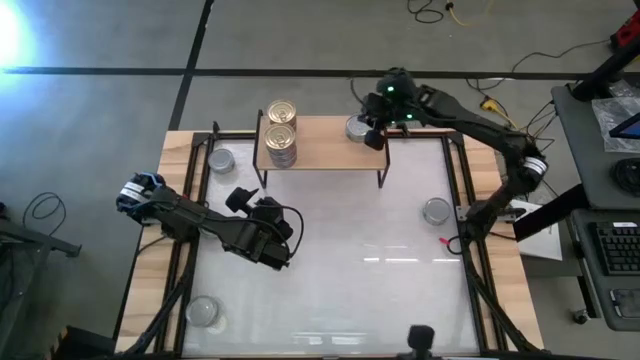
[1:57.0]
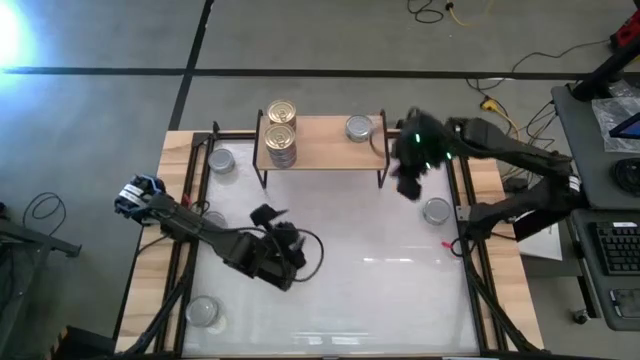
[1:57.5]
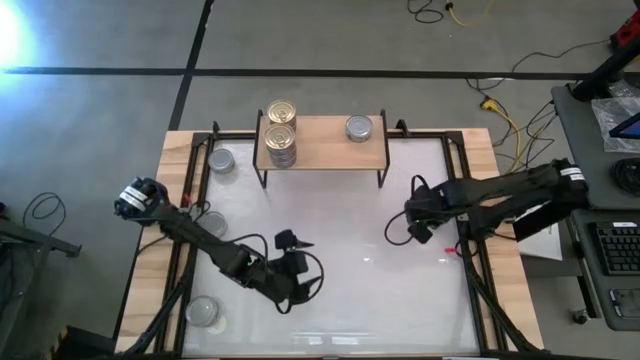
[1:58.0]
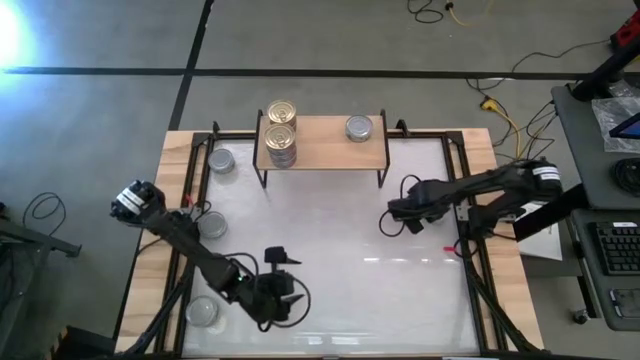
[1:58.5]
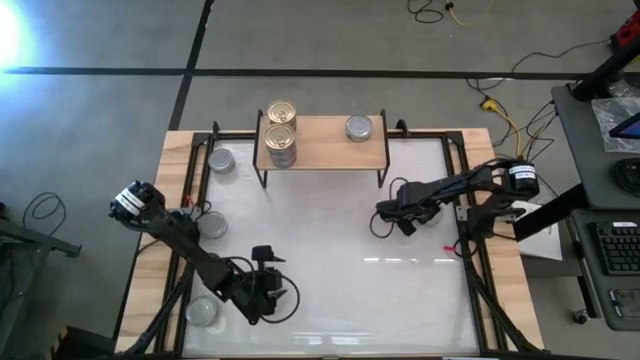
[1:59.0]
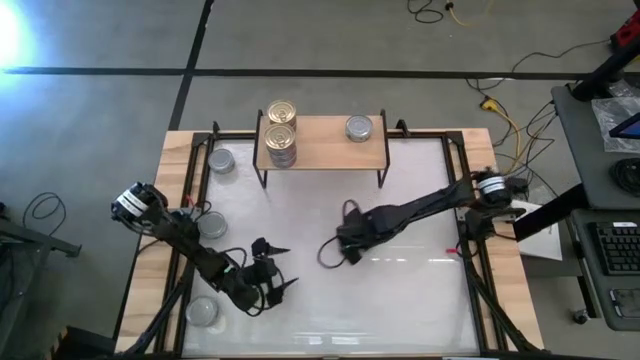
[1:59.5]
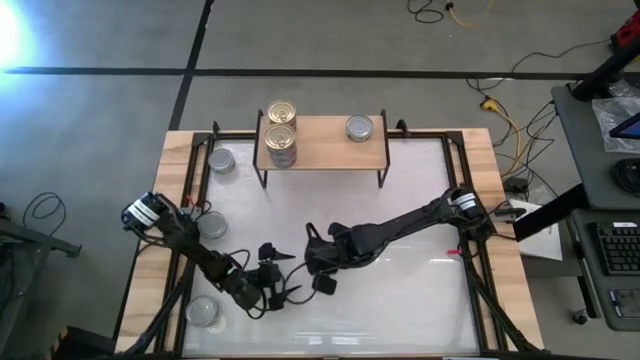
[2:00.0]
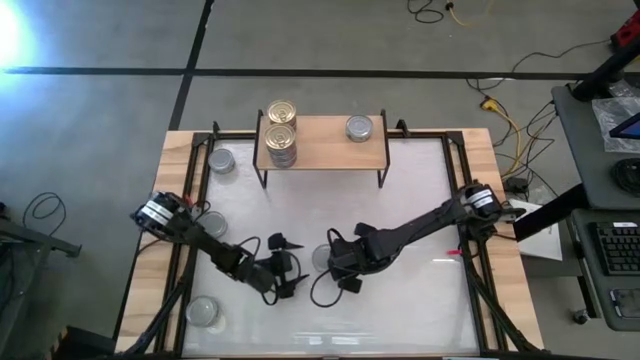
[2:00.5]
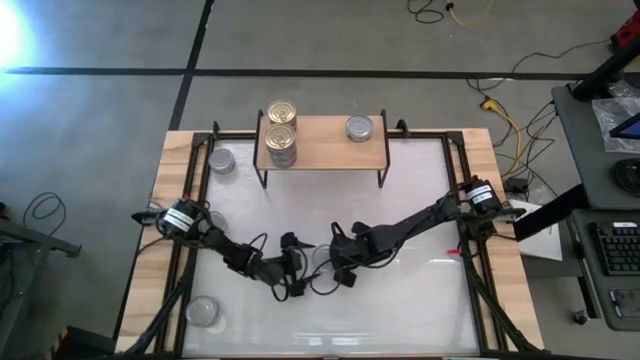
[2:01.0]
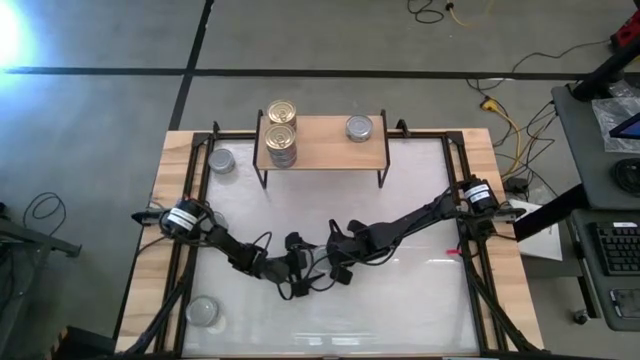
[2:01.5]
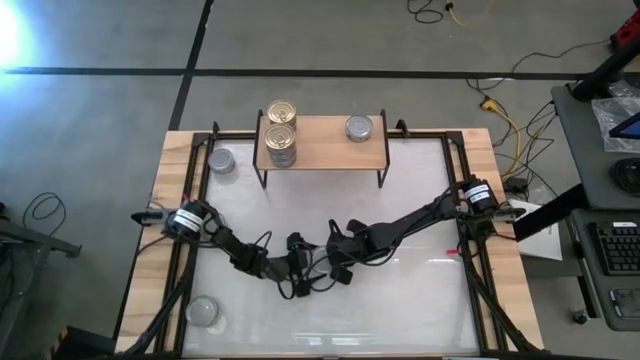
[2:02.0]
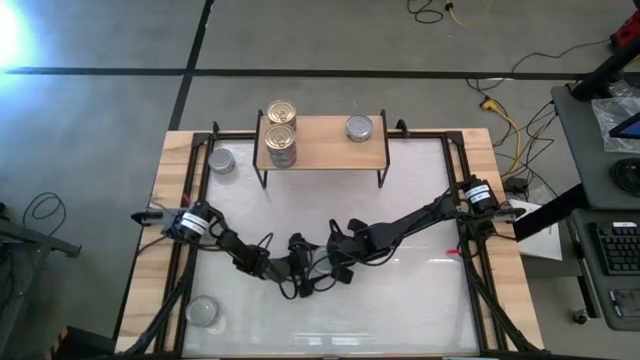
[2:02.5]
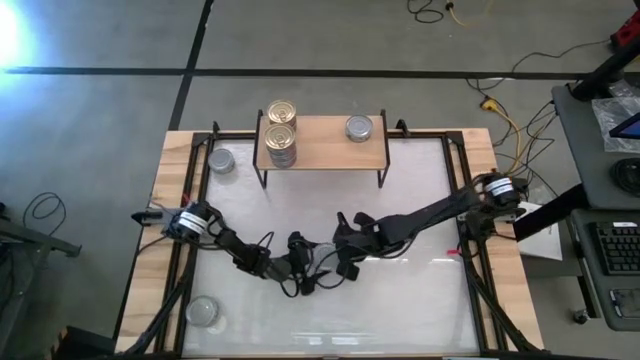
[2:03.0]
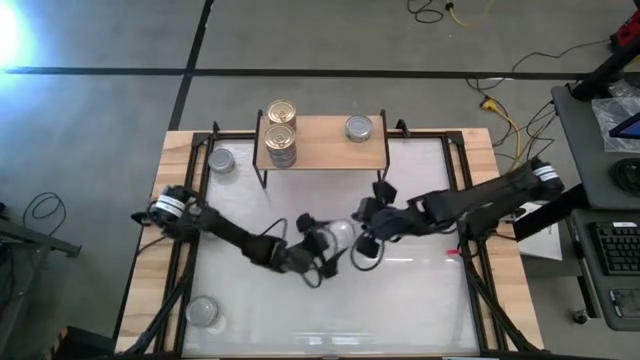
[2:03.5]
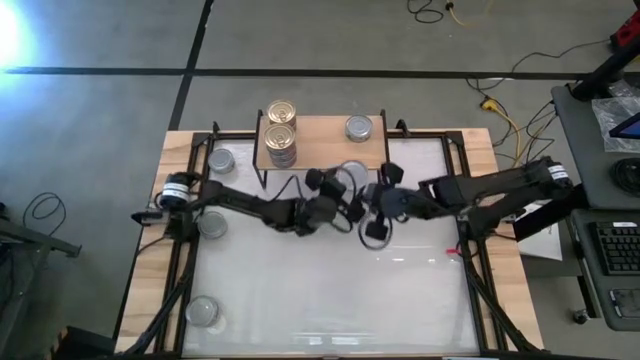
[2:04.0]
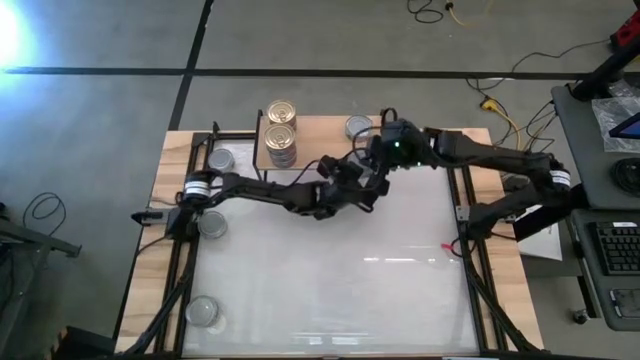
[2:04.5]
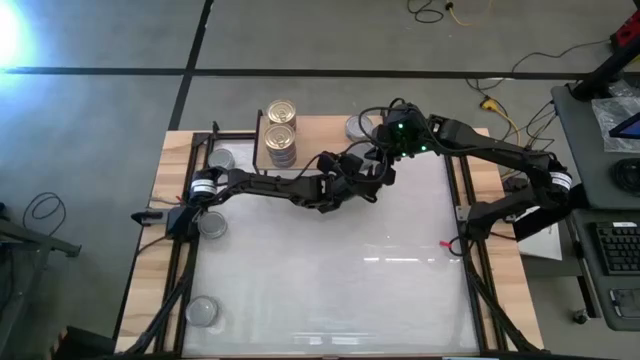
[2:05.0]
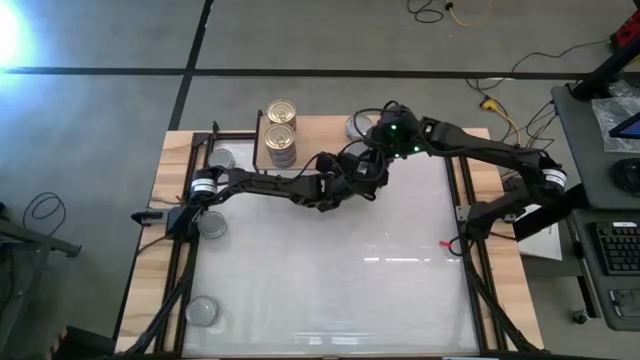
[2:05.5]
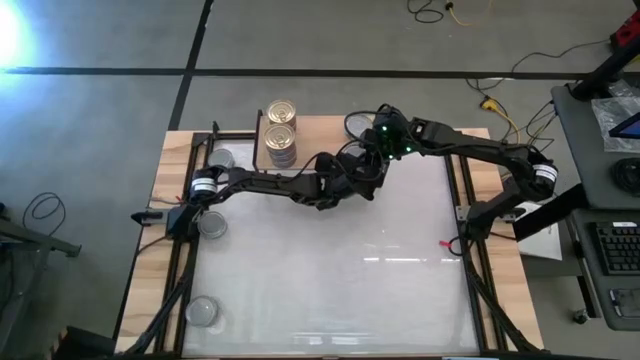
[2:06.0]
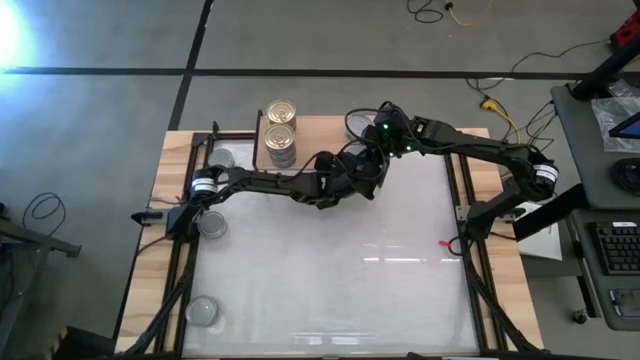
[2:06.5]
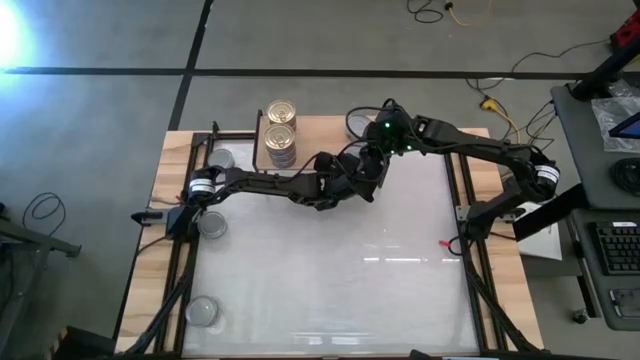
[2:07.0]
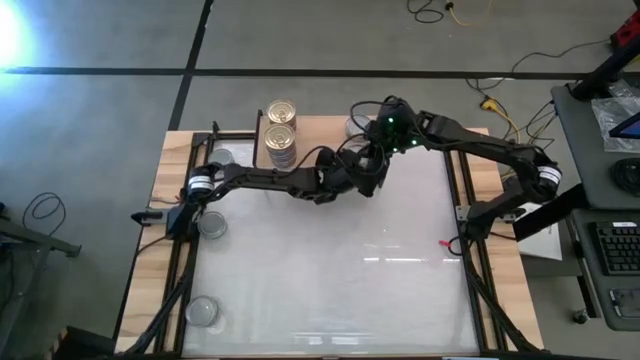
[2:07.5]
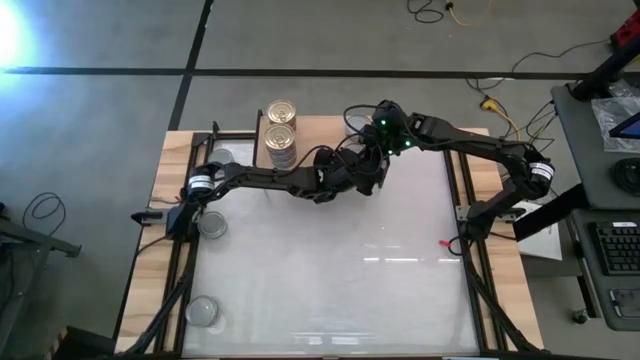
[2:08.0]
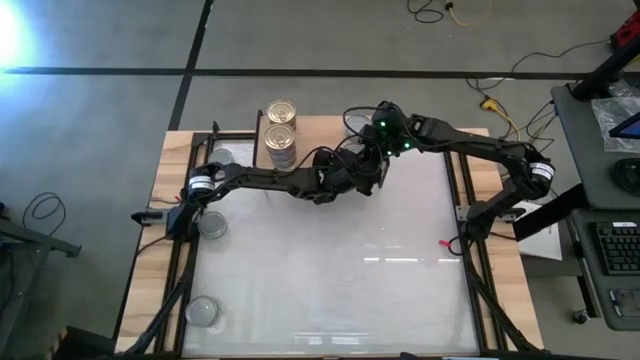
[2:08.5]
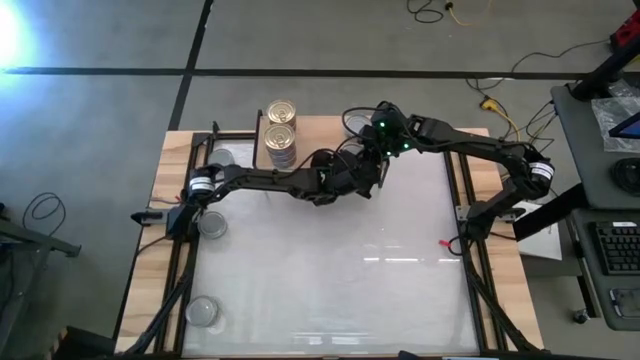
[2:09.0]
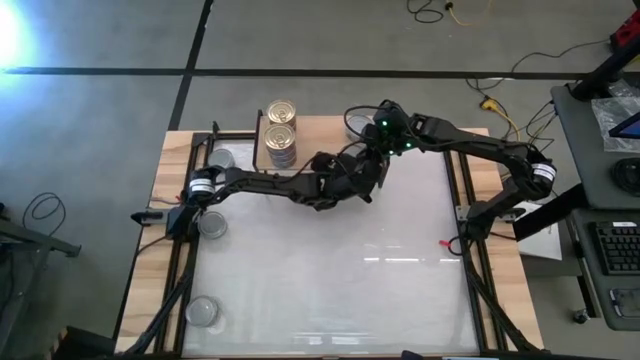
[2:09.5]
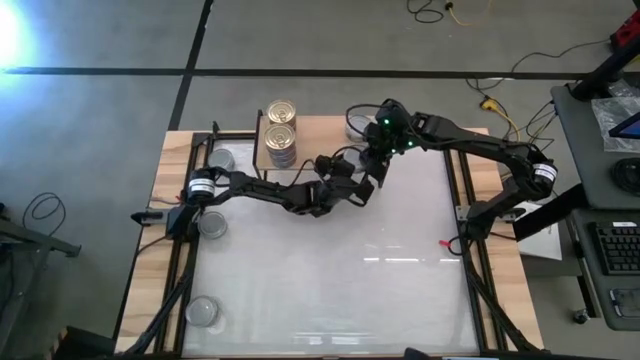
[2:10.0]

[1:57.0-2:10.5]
Task: Stack canned seafood by type on shelf
Put the green tuna can on the shelf

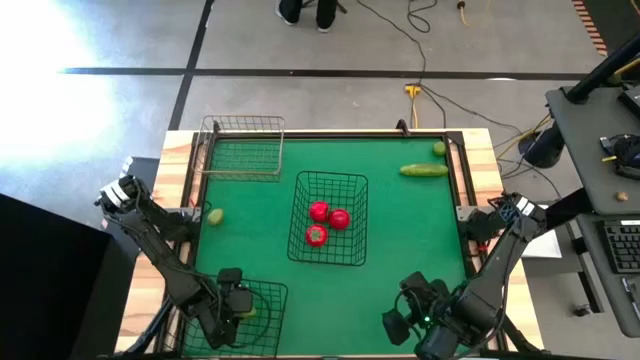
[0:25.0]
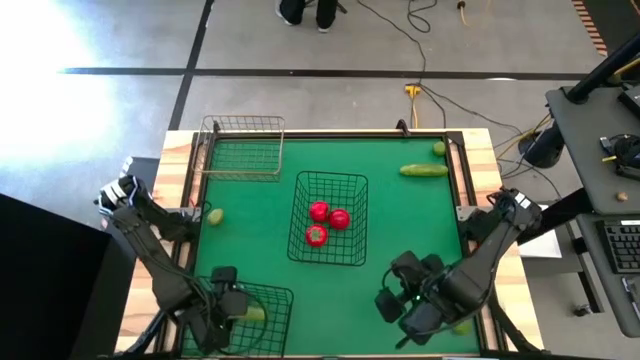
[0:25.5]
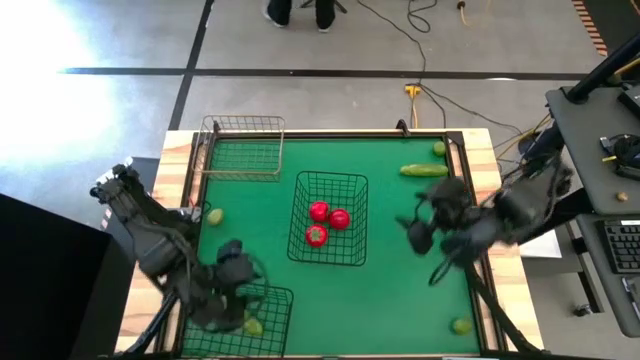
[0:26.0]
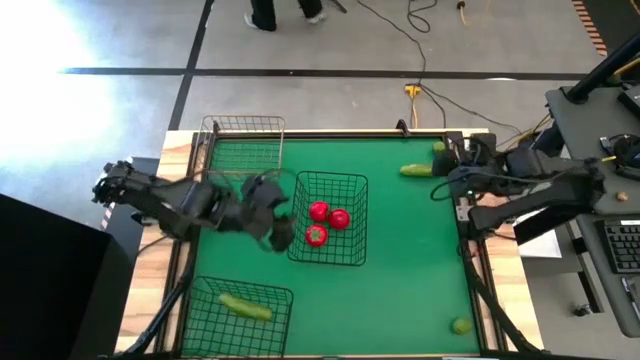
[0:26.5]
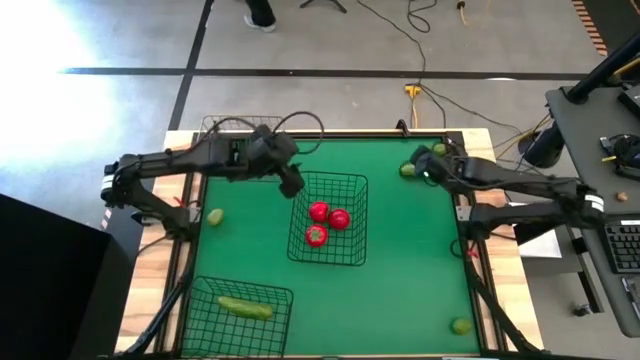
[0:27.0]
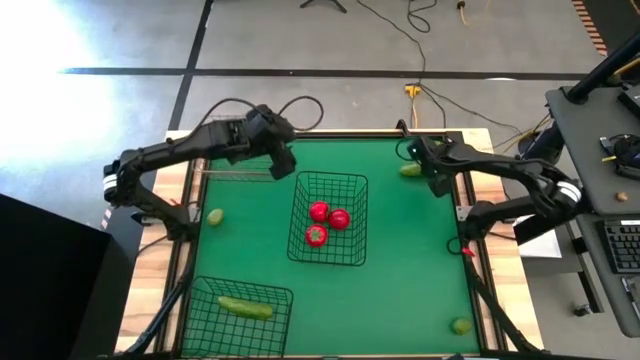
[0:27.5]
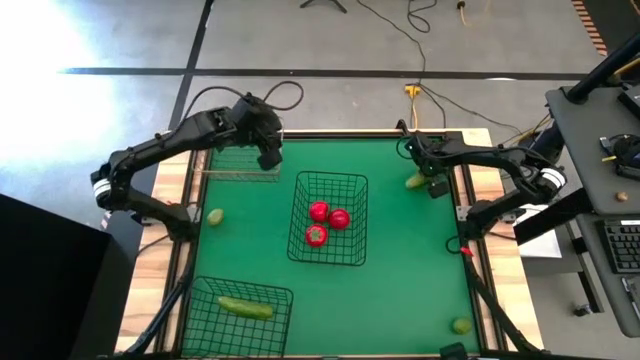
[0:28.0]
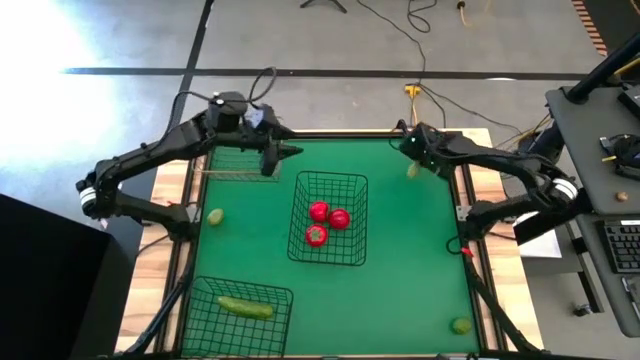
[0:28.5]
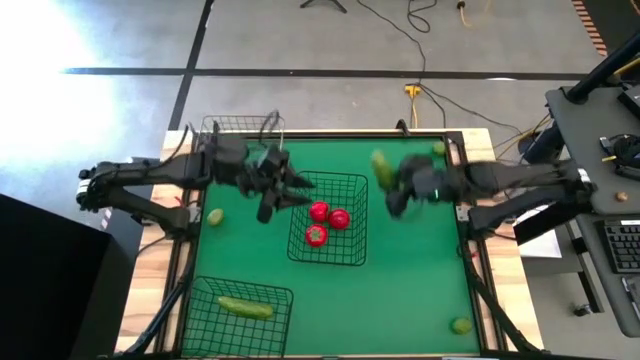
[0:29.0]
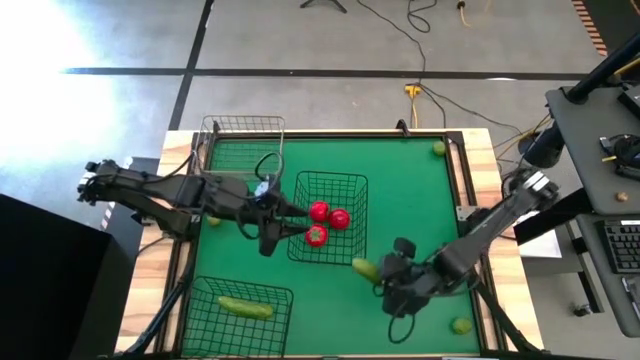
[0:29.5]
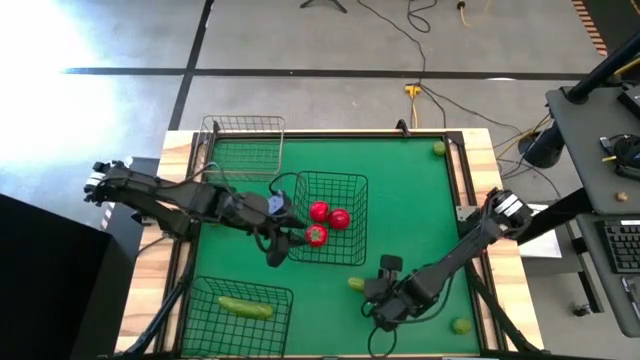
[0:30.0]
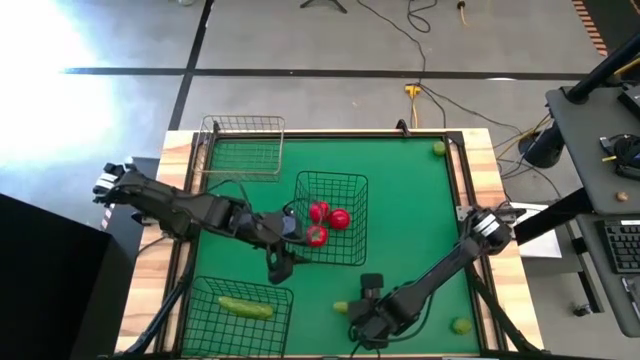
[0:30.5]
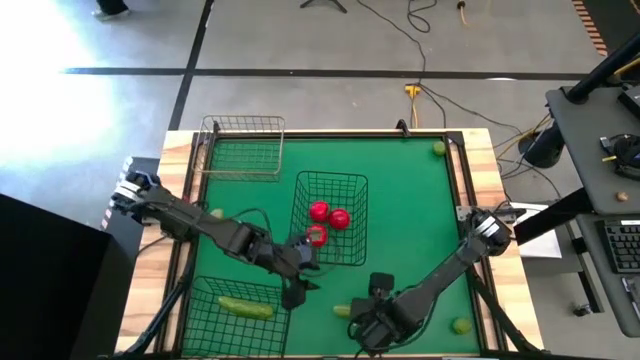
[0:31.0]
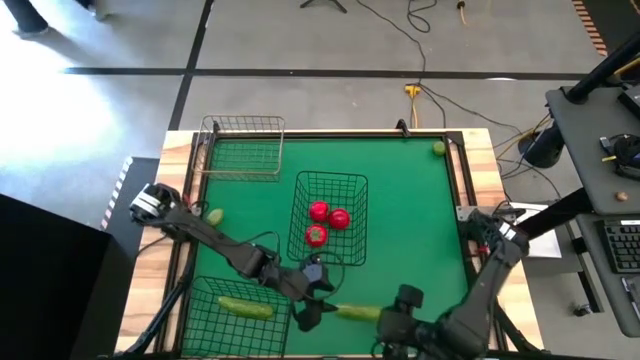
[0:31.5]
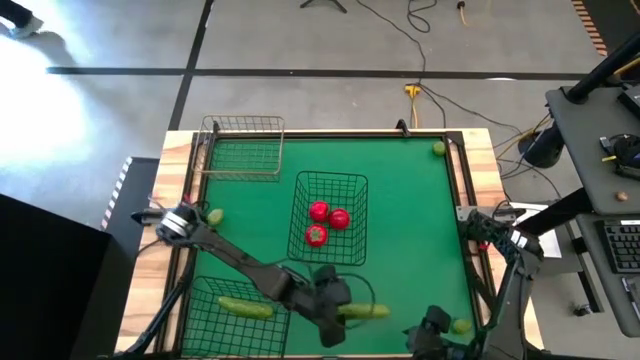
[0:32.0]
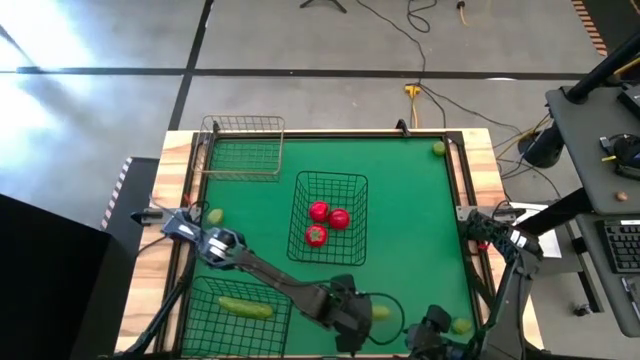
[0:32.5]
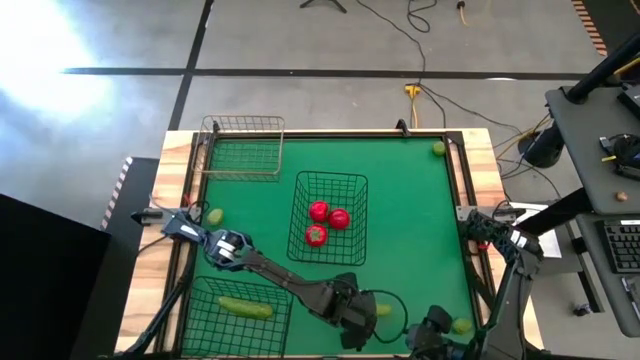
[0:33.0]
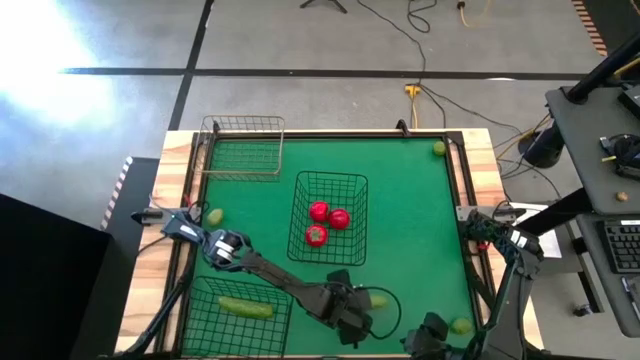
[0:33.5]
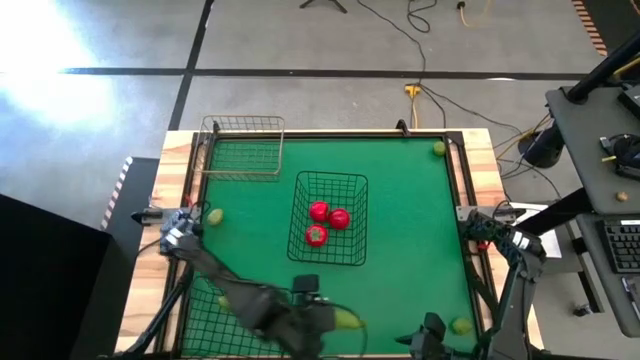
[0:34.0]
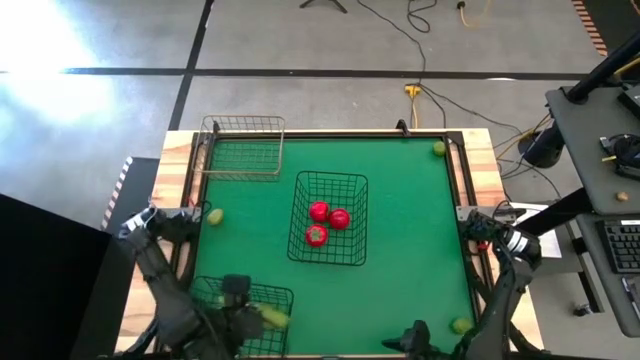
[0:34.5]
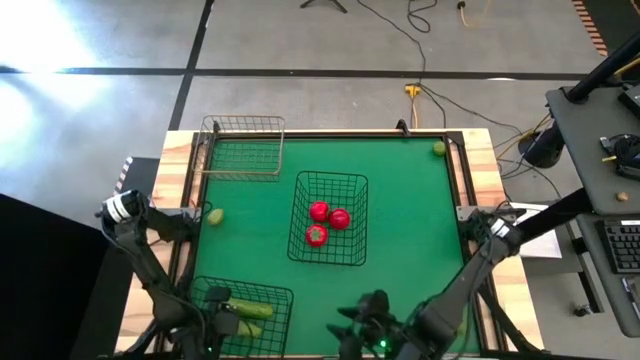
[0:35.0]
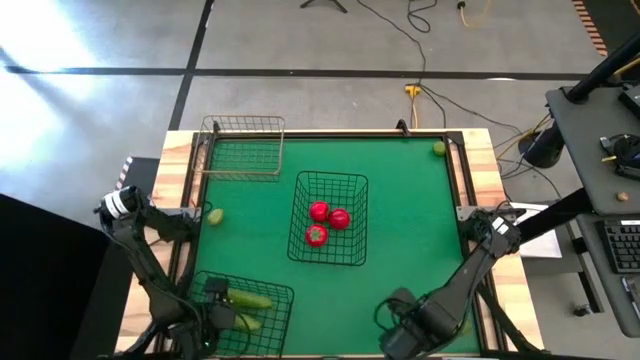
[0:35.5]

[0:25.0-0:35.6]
Task: Sort produce into baskets
Put the cucumber into the bottom black wire basket
